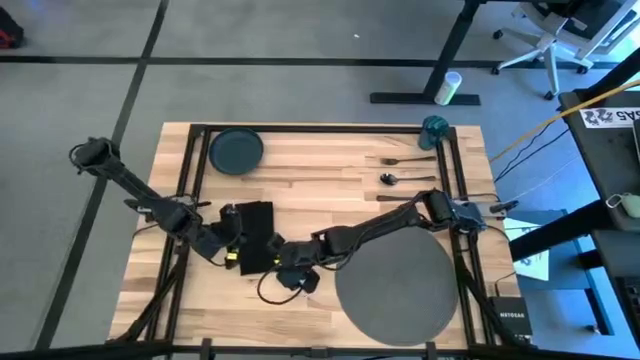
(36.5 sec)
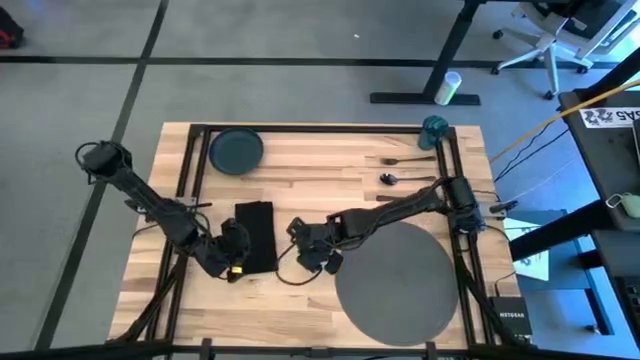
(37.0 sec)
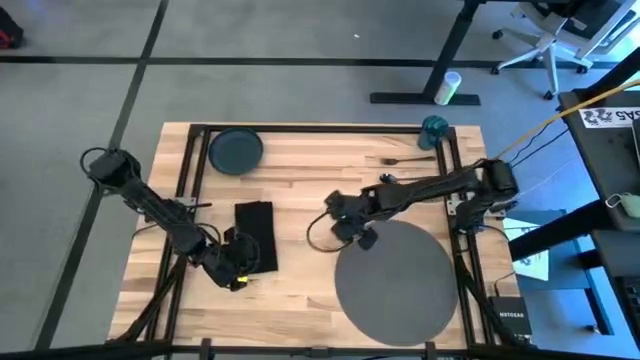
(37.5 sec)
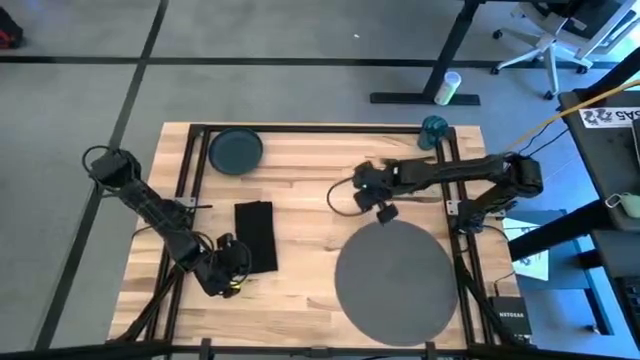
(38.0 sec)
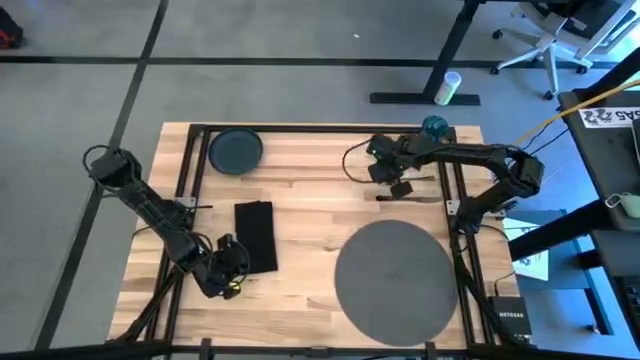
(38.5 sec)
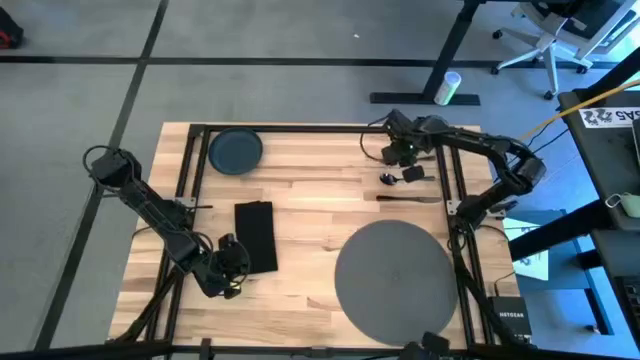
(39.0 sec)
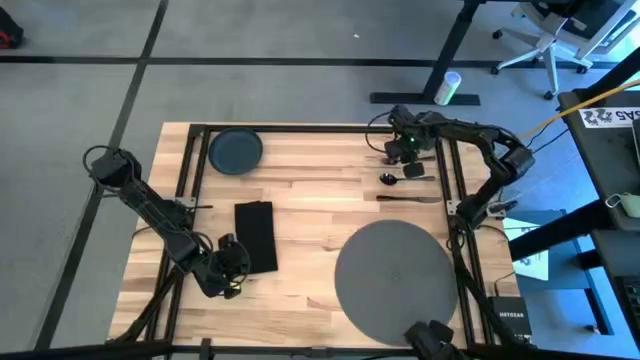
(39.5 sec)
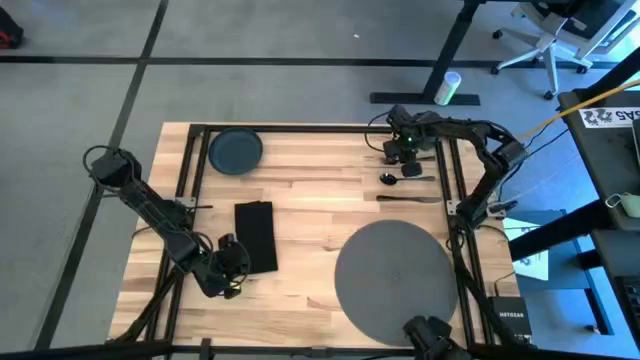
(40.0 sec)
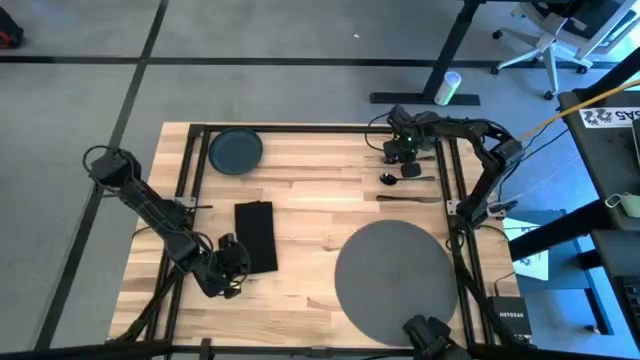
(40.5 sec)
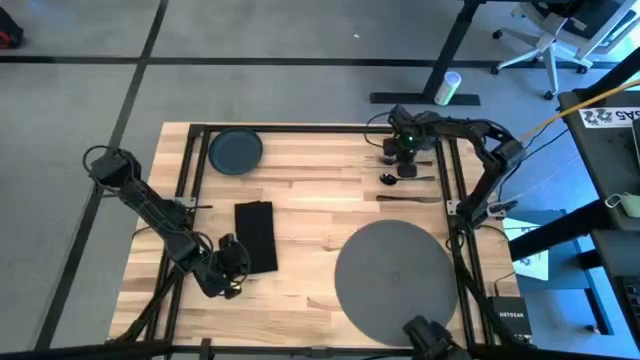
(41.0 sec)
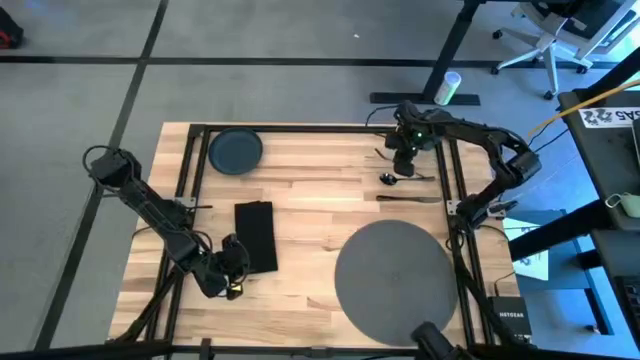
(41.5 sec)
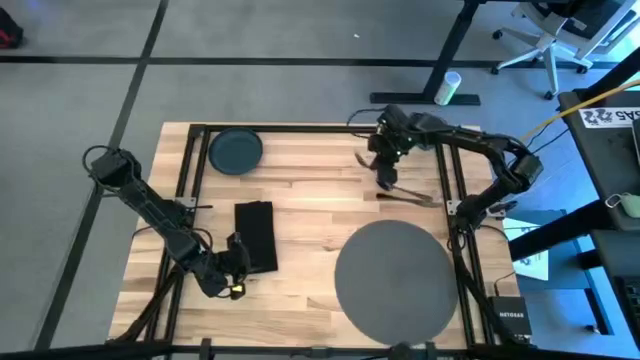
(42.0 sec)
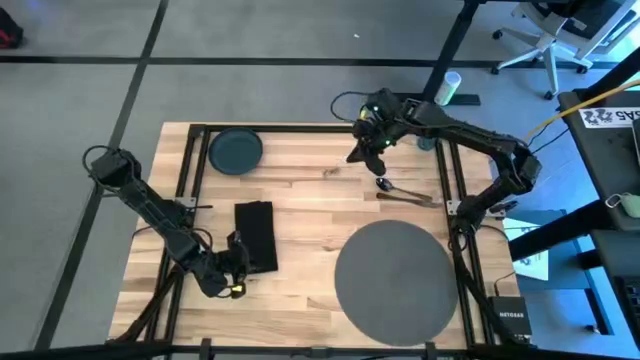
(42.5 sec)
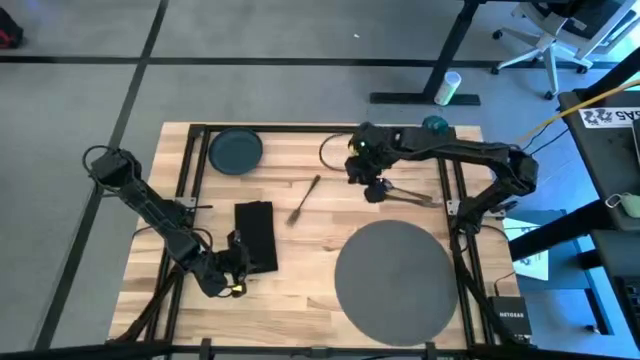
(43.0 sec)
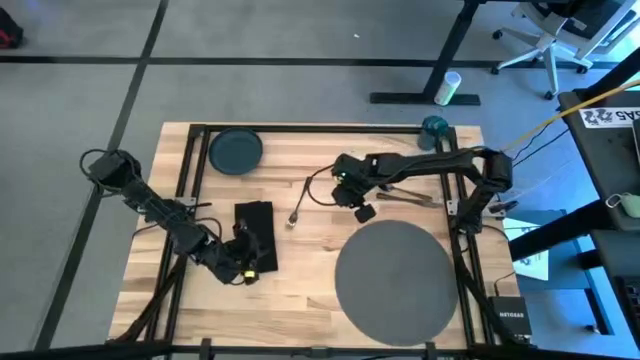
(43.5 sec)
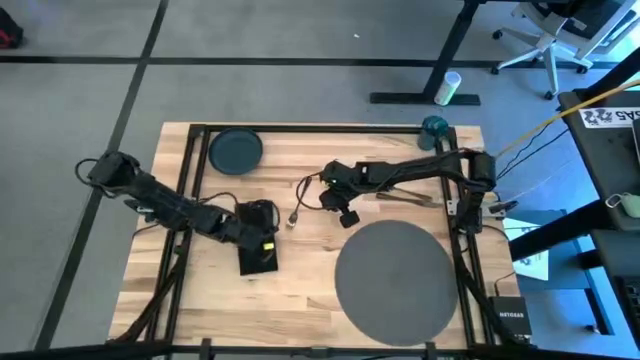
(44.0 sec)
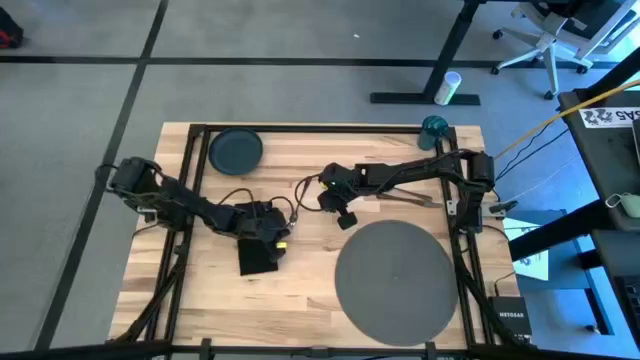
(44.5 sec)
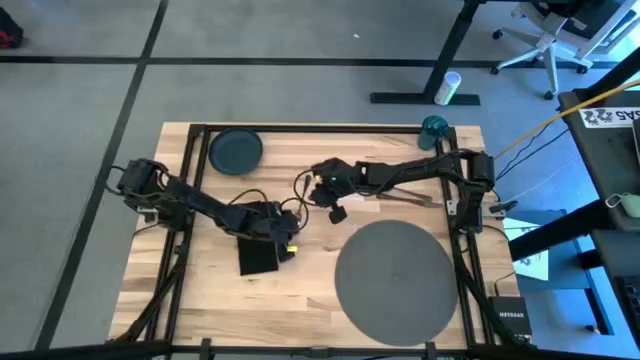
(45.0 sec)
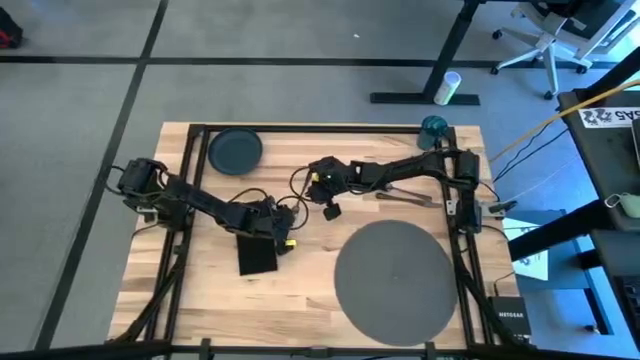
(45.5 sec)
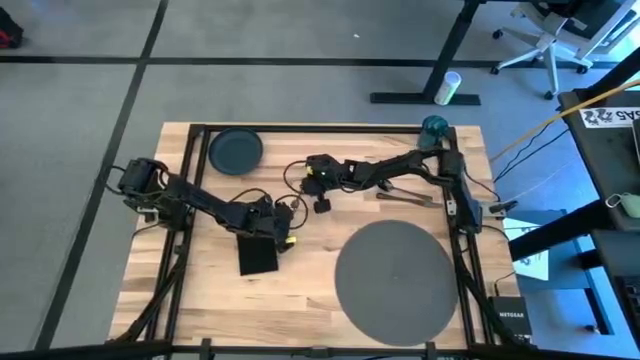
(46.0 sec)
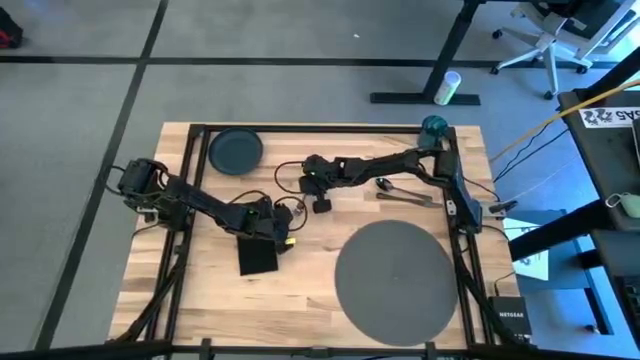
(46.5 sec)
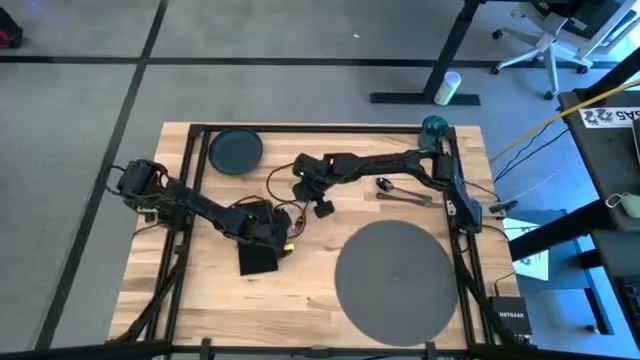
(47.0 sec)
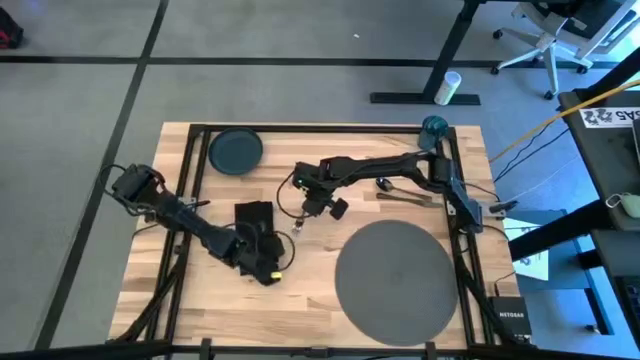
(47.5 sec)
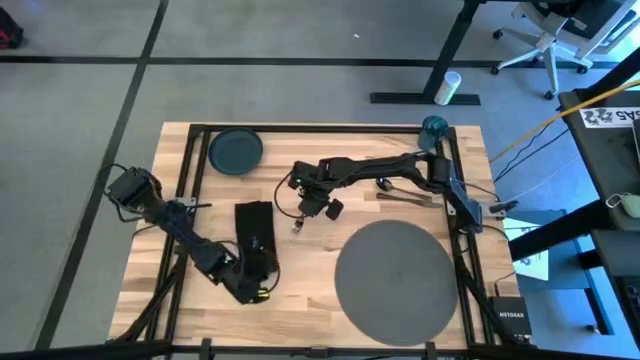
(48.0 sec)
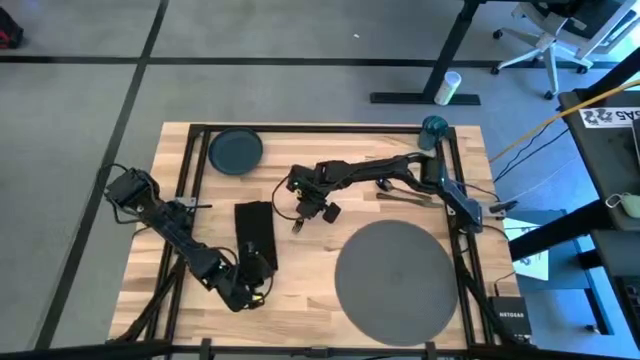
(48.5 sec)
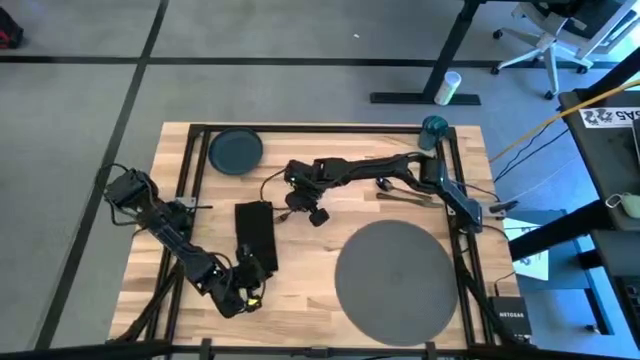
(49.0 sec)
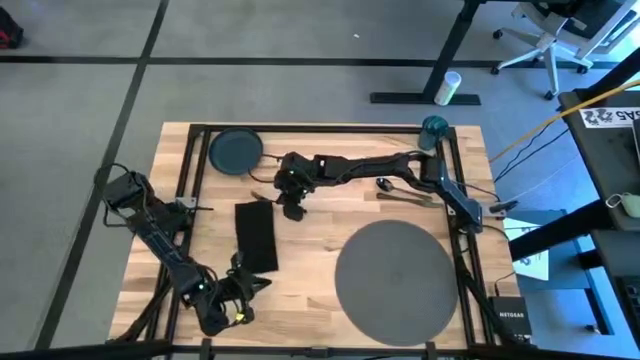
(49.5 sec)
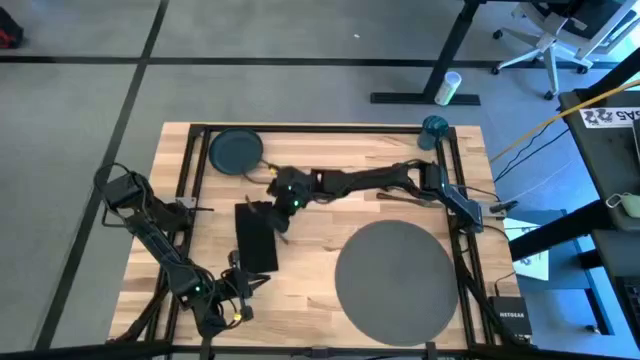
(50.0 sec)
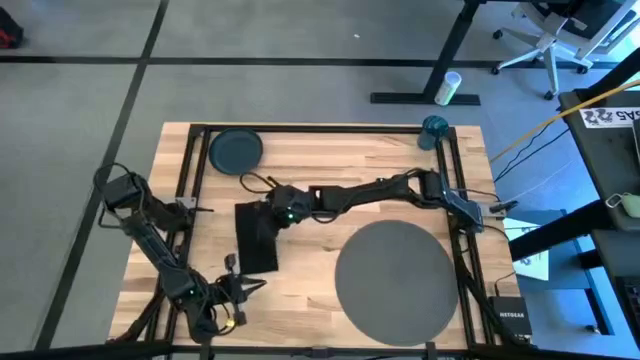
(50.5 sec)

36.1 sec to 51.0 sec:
Task: Set table place
Put the black fork on the black table napkin

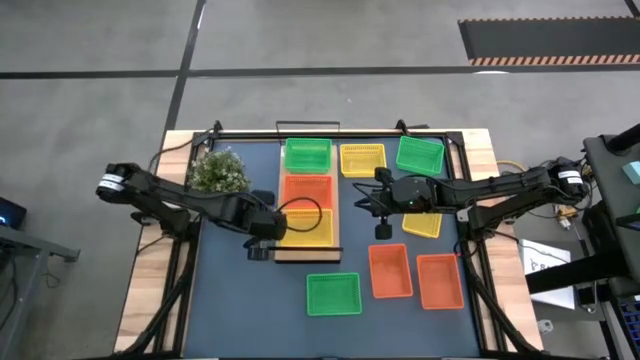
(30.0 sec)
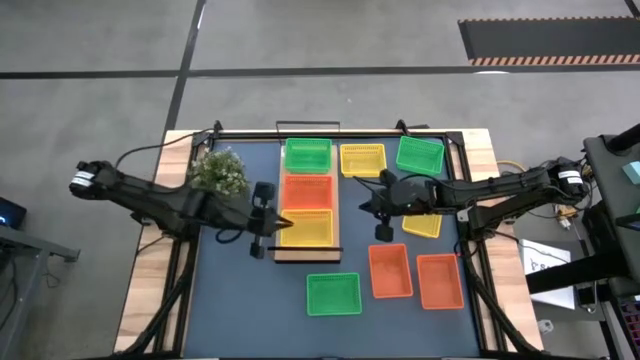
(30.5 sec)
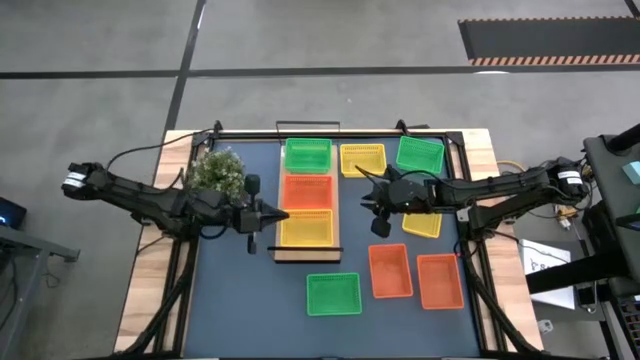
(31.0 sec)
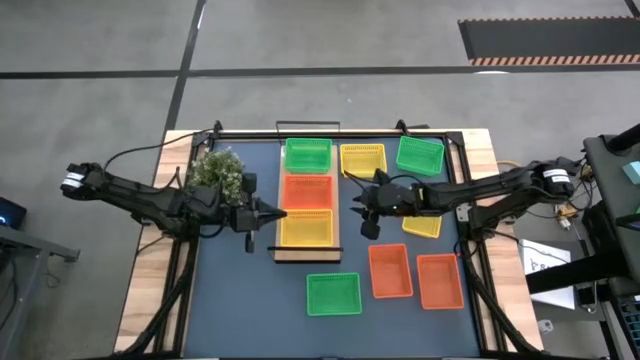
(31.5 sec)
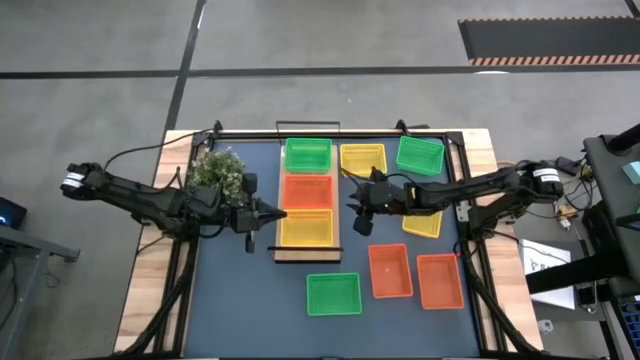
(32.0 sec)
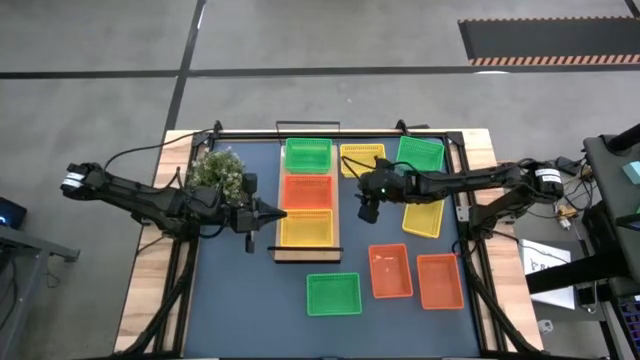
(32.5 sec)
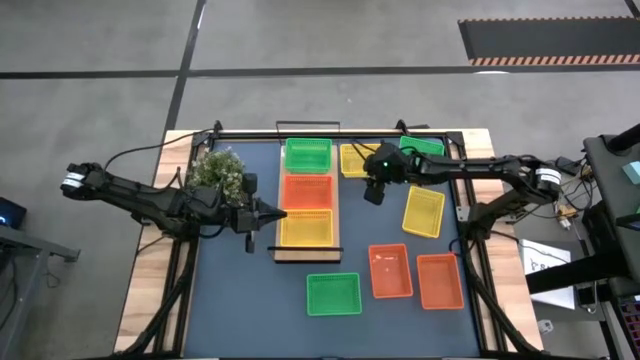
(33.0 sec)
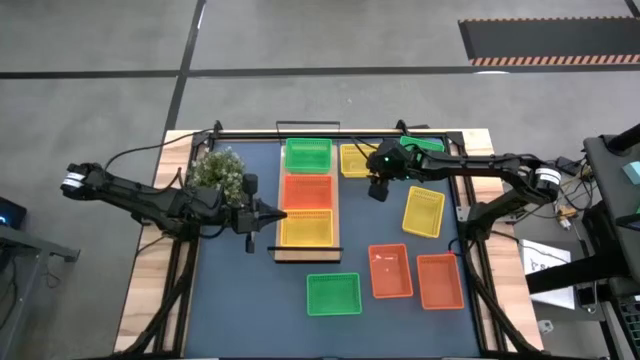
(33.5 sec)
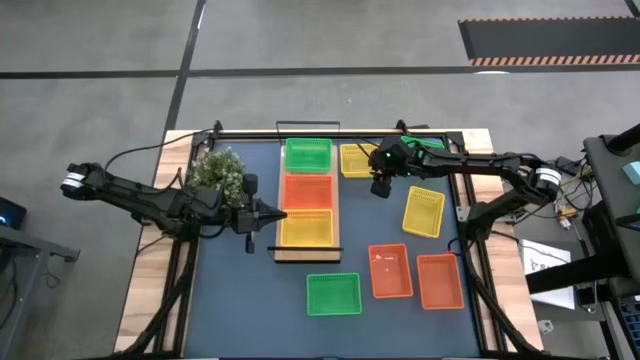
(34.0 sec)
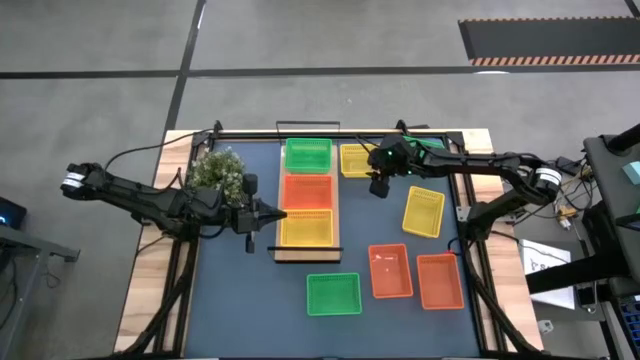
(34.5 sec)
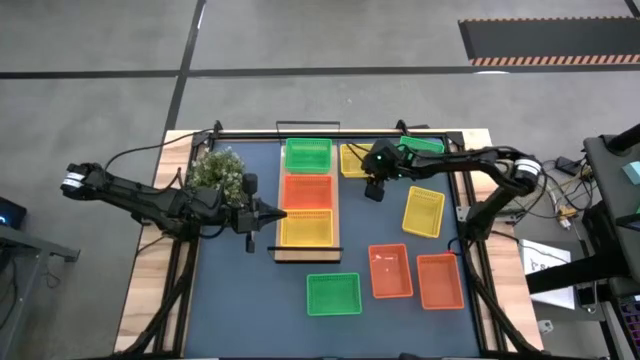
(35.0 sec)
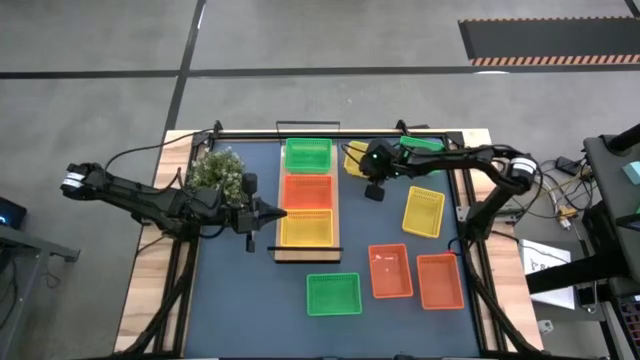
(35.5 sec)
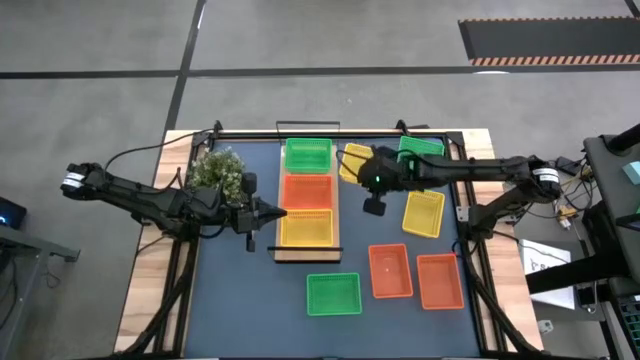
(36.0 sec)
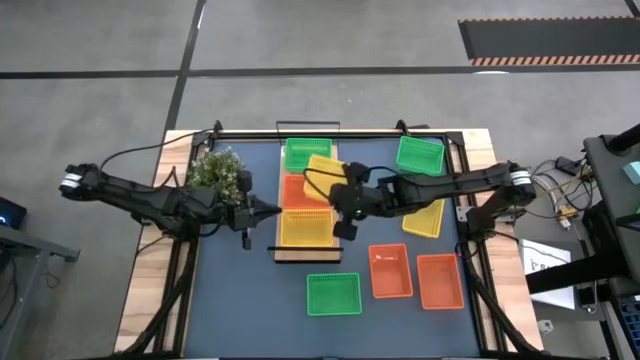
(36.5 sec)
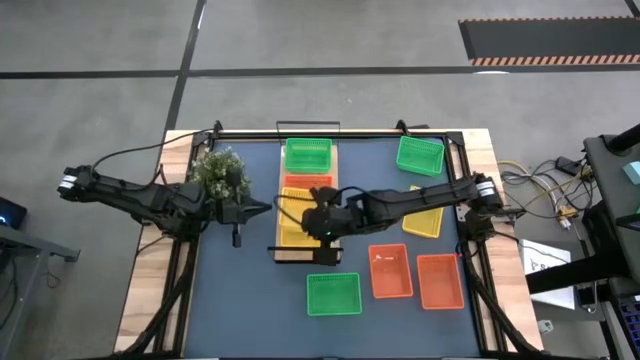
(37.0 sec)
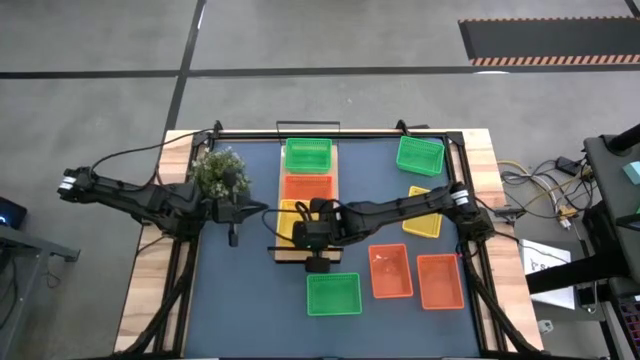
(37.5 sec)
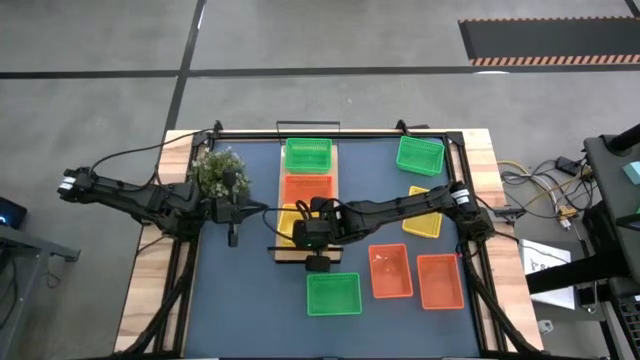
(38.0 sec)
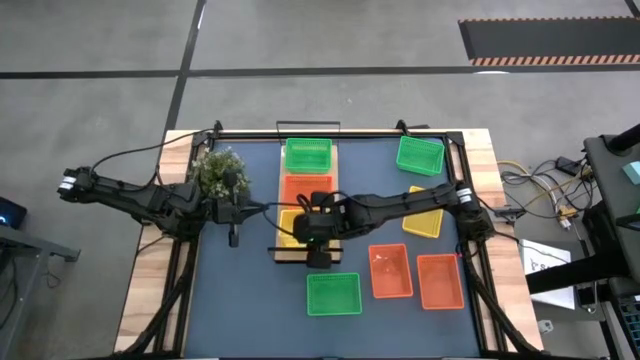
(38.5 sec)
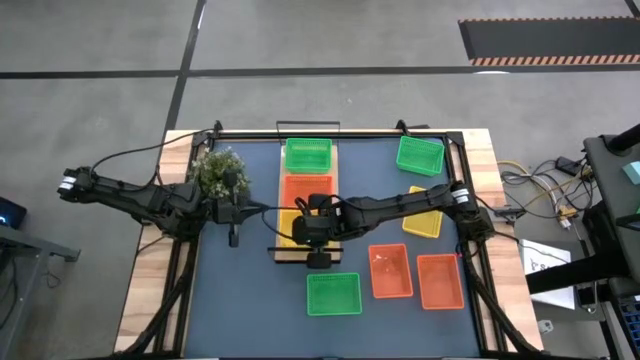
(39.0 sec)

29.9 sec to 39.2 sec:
Task: Stack baskets on shelf by color
Stack the top yellow bin on the yellow bin on the shelf
